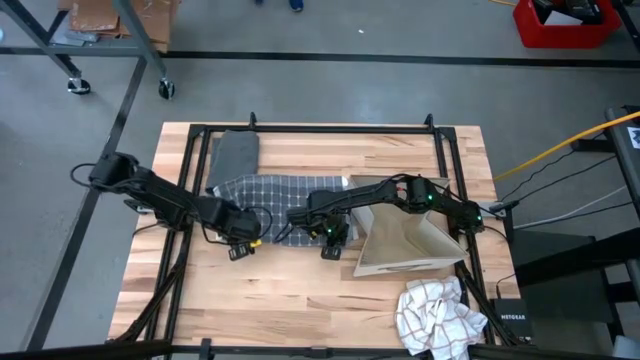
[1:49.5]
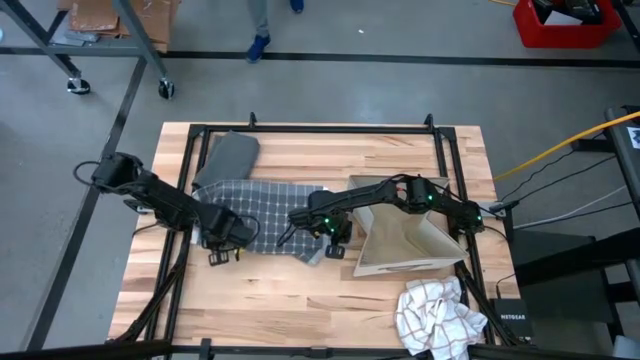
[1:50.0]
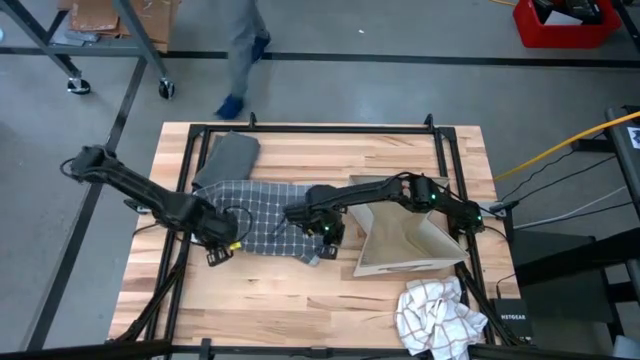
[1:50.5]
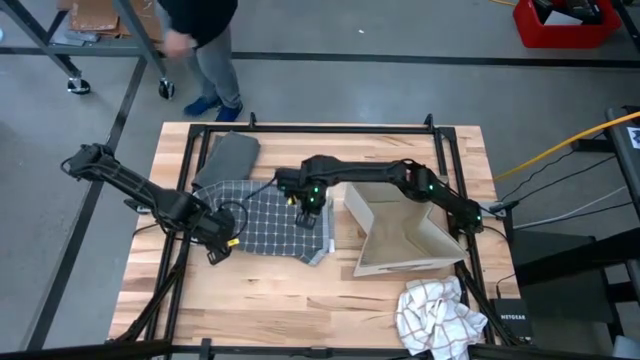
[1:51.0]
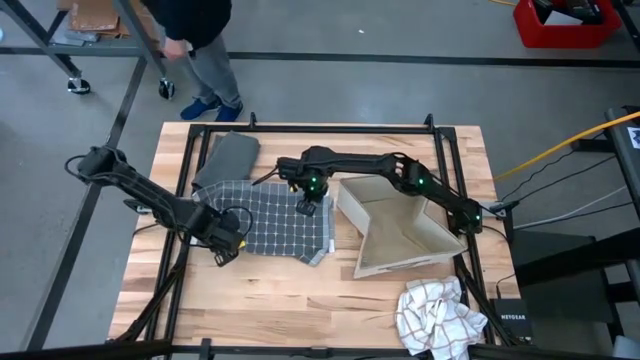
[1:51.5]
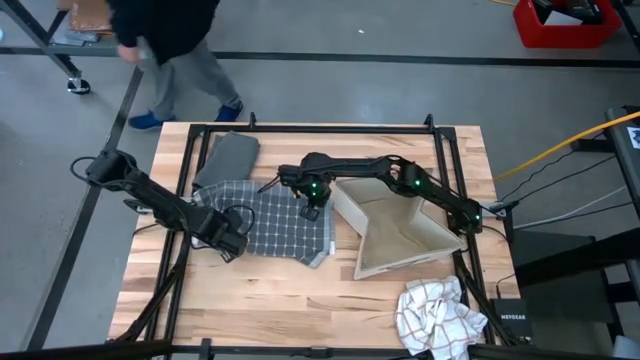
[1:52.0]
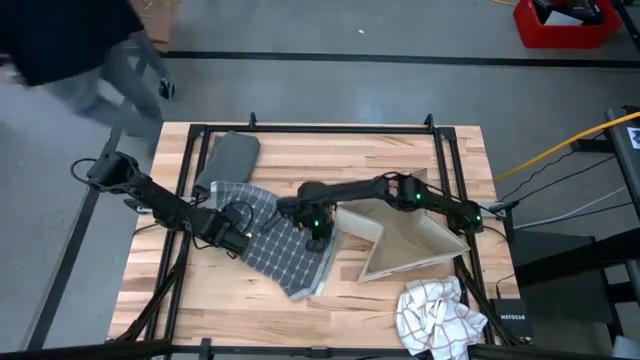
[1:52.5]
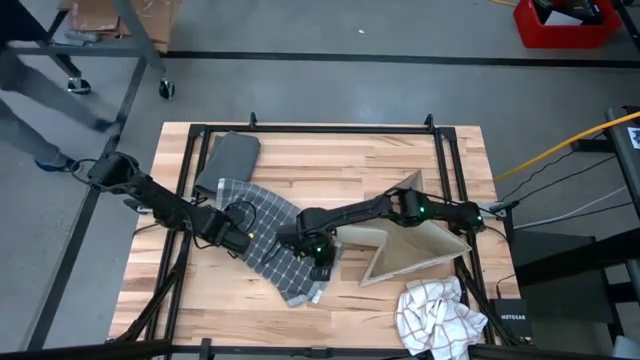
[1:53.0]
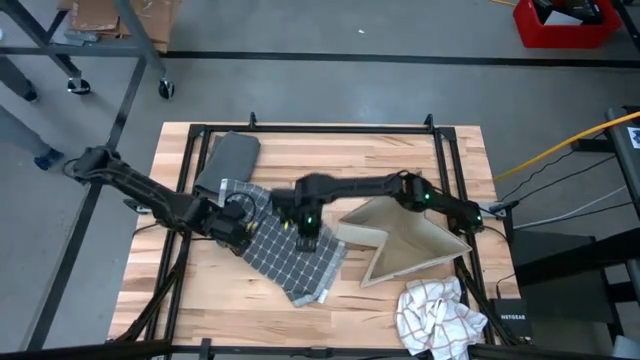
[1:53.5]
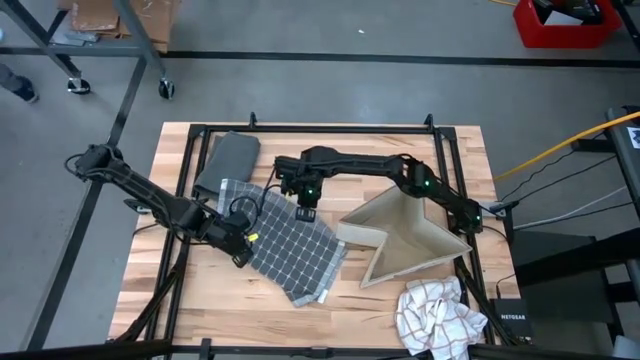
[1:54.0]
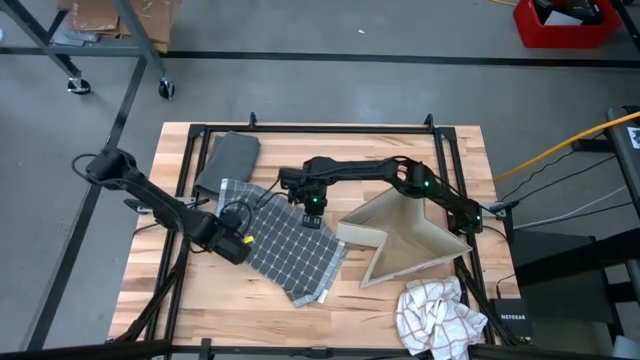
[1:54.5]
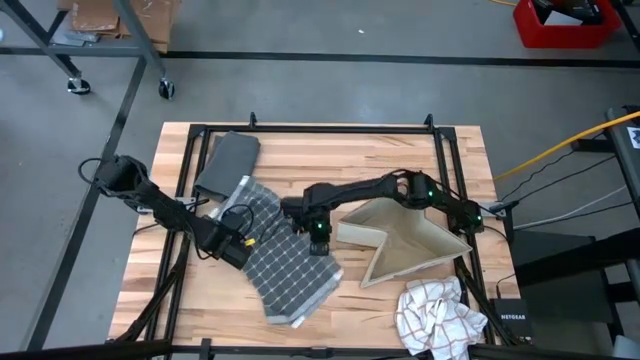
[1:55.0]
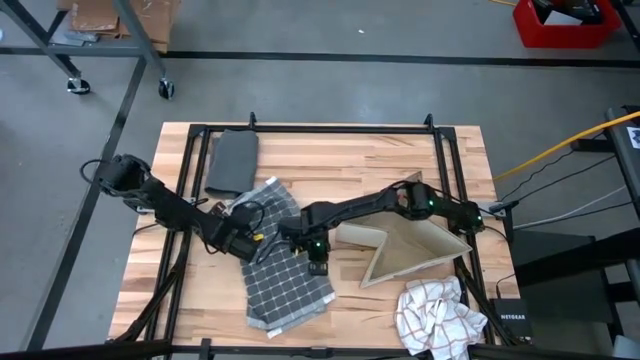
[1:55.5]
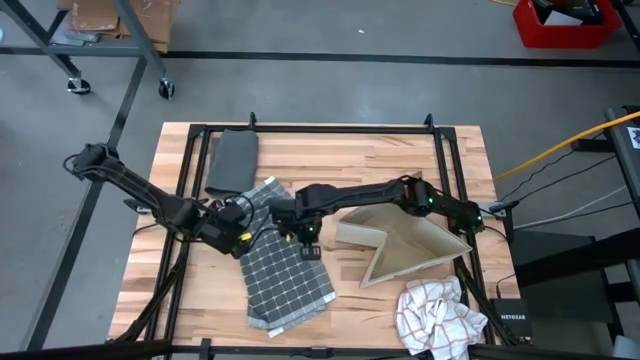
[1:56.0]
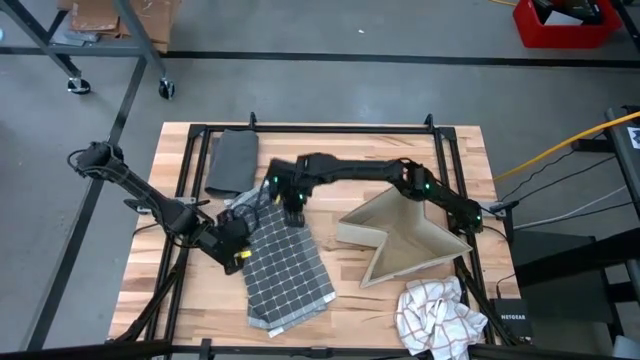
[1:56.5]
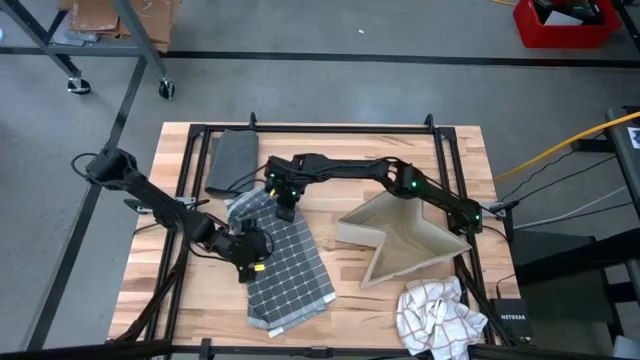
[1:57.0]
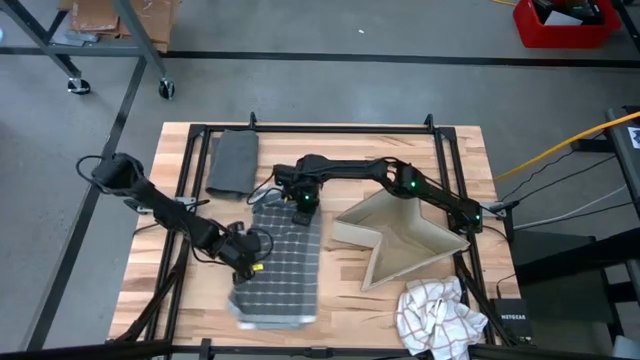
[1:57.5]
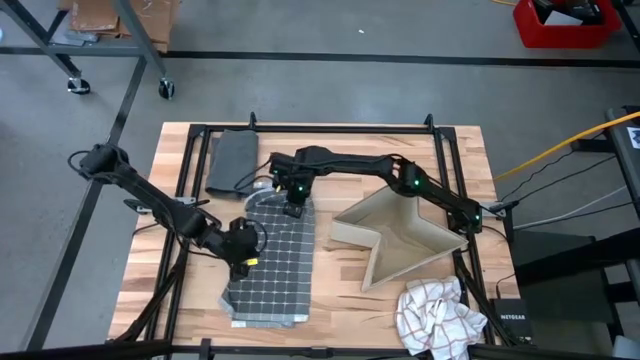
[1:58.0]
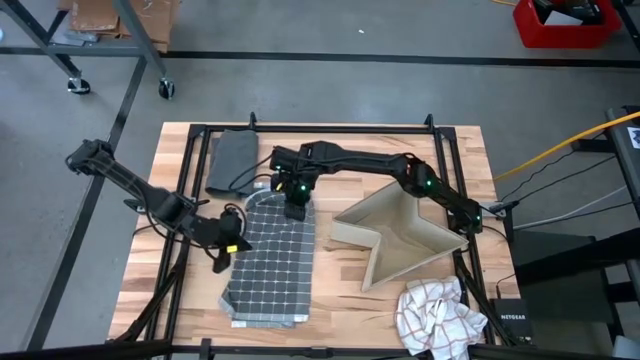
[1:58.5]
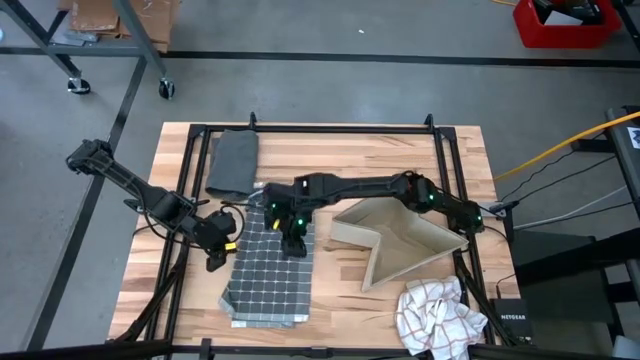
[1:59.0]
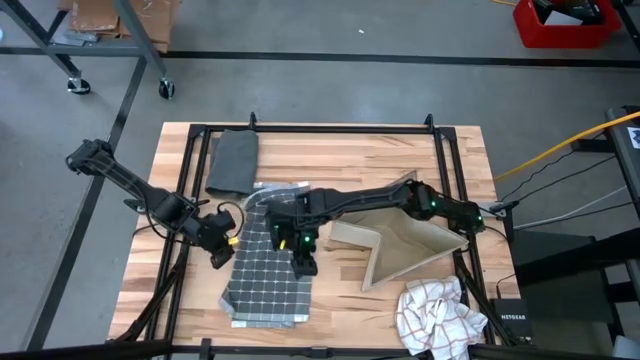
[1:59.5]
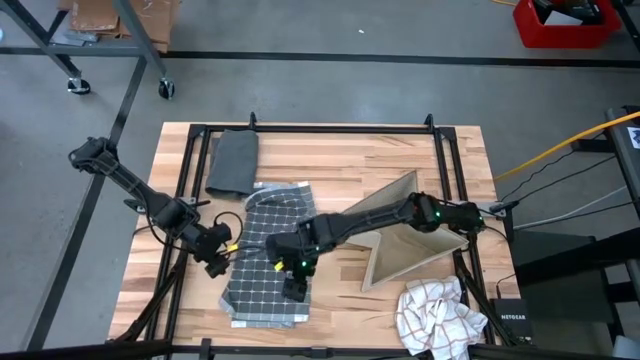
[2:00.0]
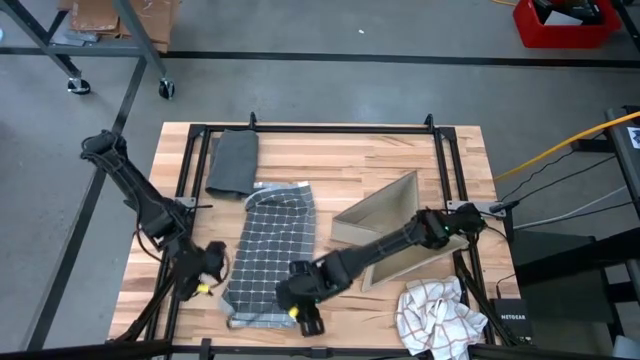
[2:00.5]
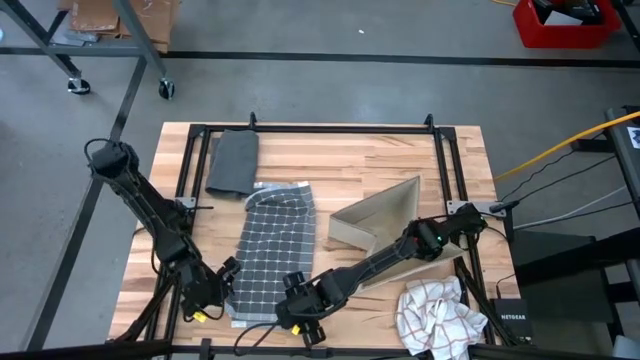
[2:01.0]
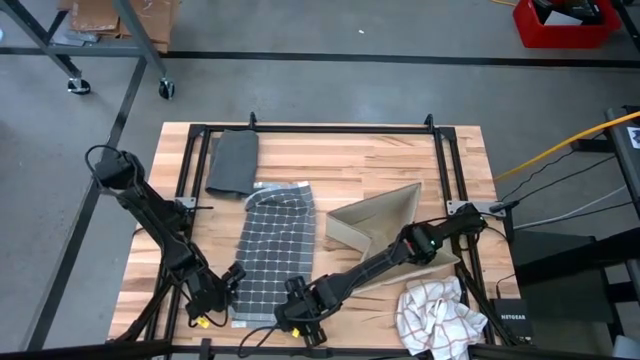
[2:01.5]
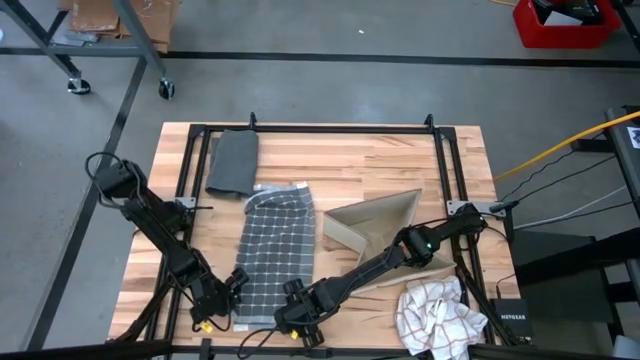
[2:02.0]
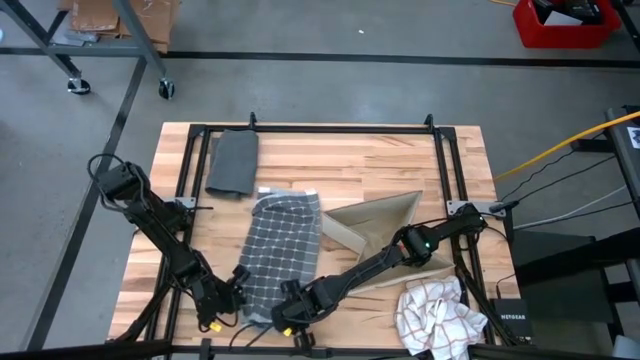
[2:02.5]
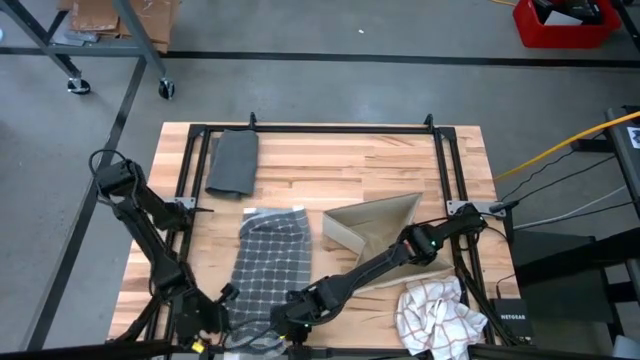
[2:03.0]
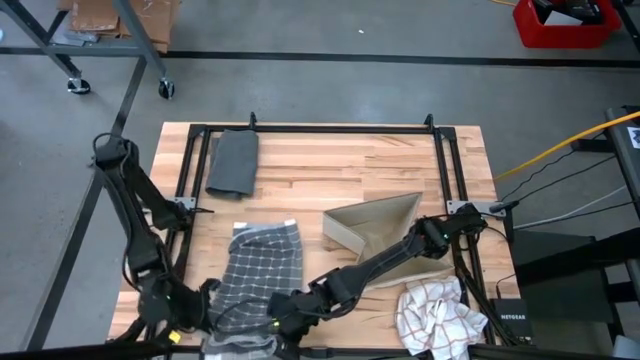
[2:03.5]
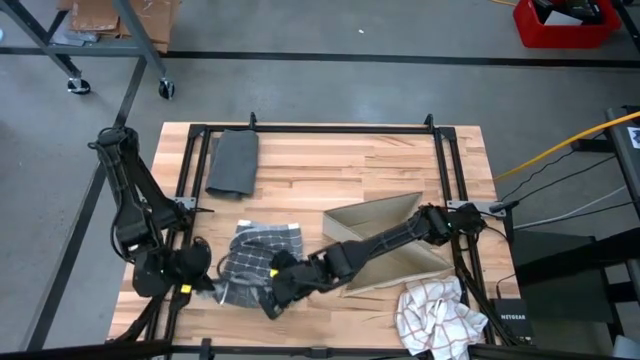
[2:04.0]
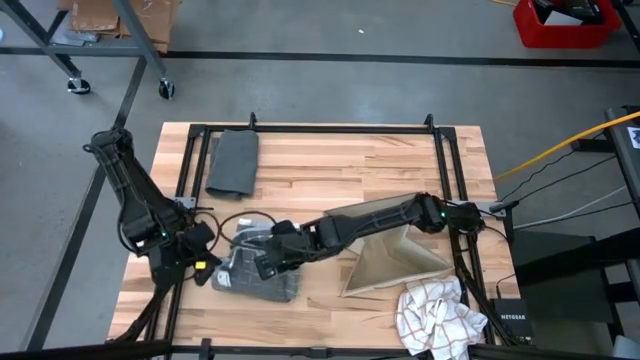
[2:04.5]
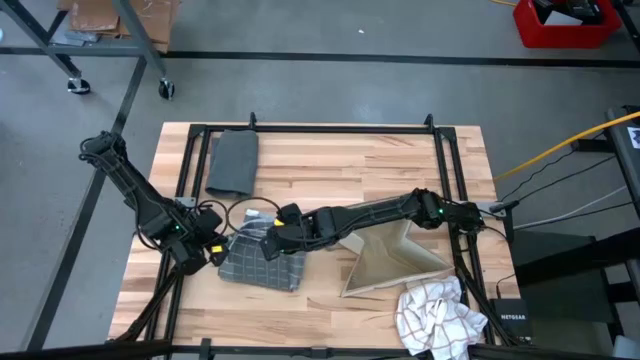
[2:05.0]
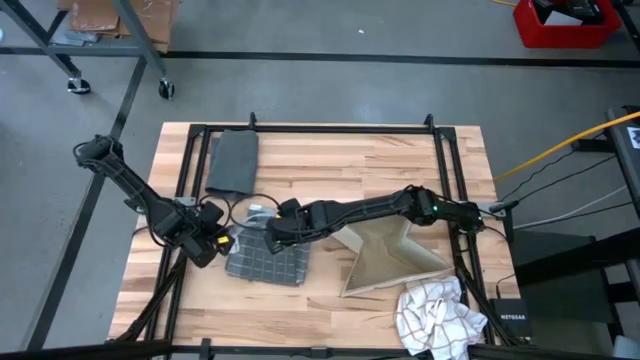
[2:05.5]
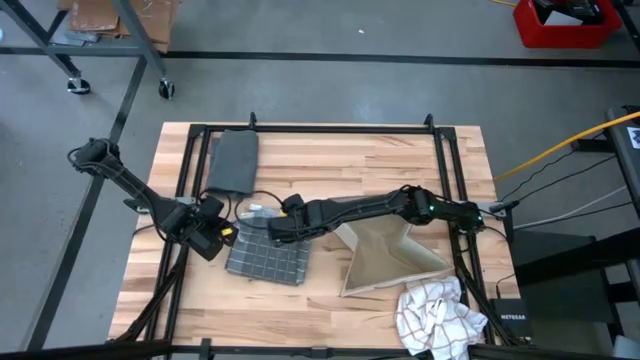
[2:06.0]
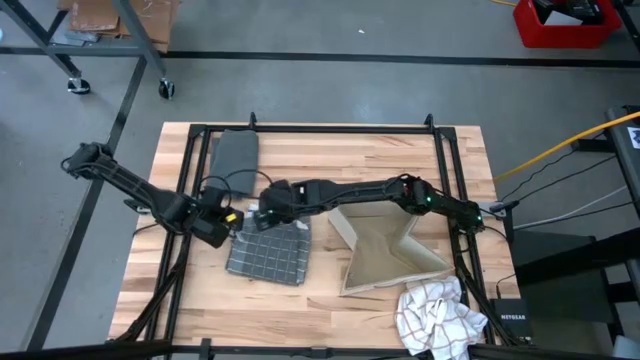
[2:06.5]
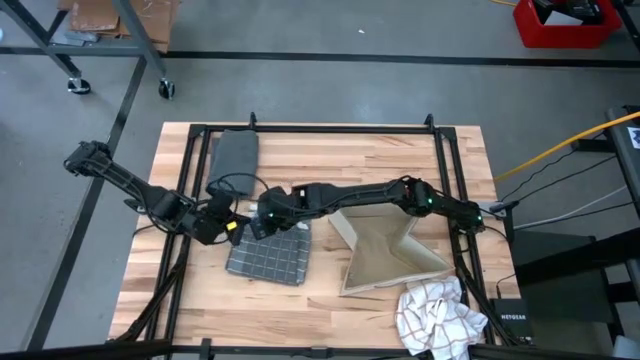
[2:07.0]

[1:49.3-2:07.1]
Task: Fold towel
Fold the gray patterned towel
